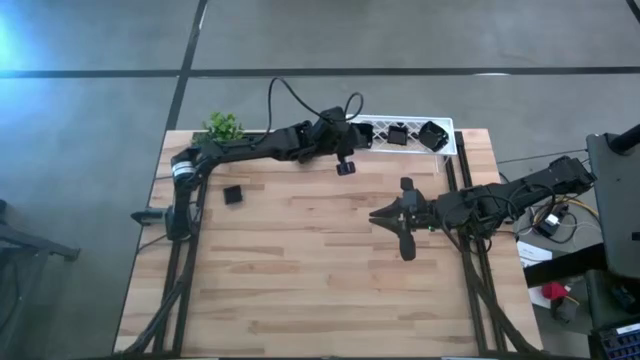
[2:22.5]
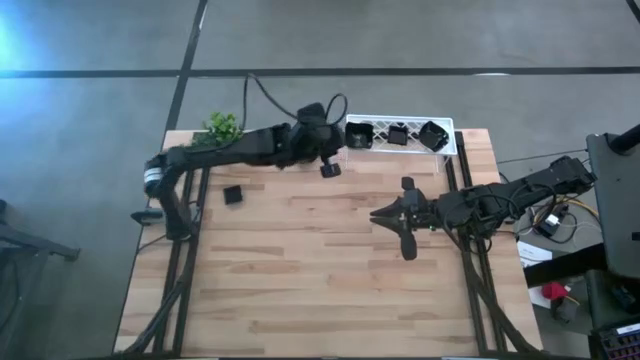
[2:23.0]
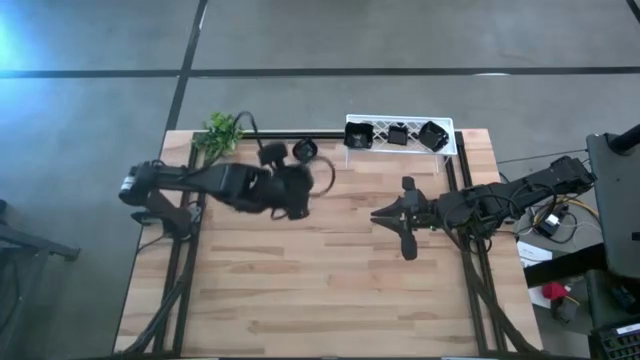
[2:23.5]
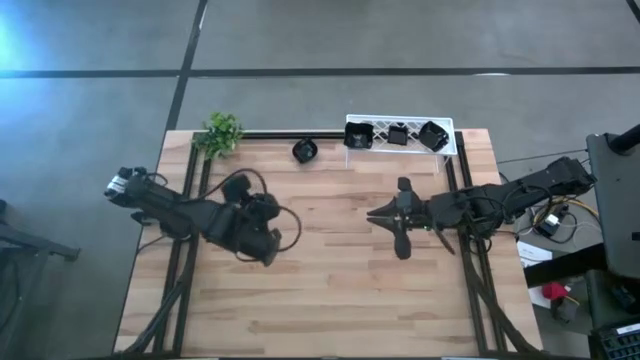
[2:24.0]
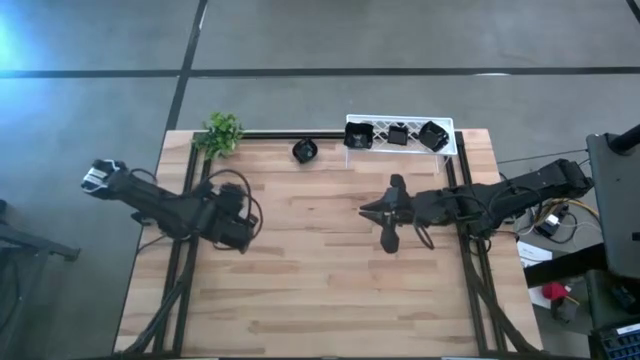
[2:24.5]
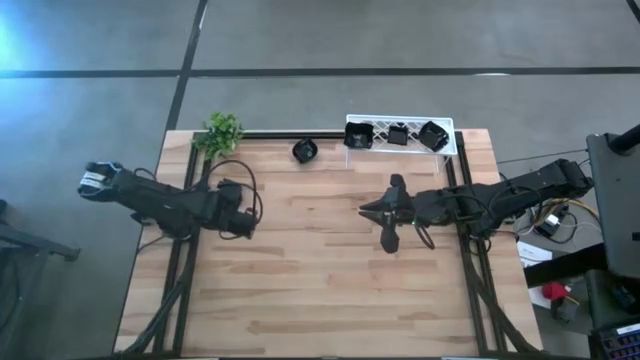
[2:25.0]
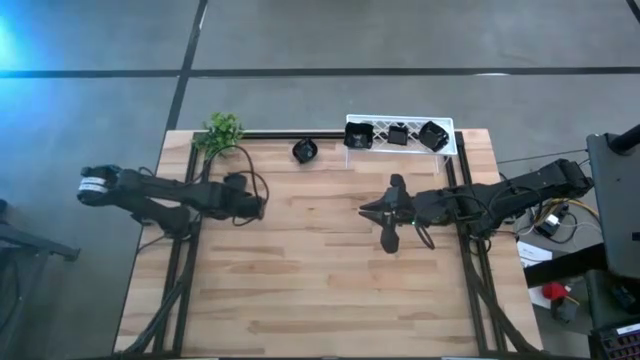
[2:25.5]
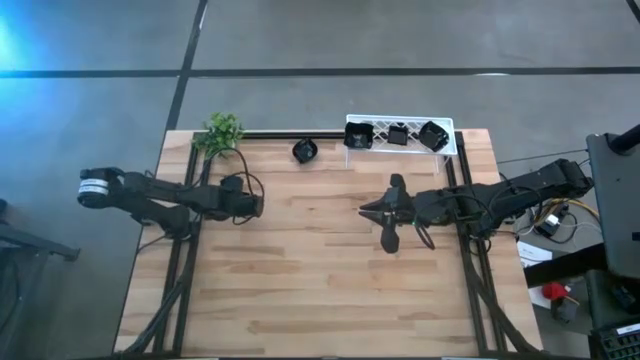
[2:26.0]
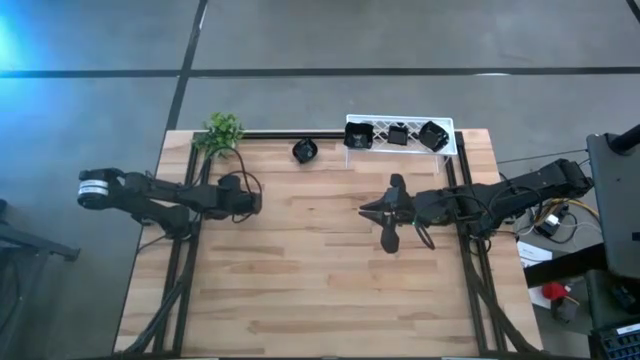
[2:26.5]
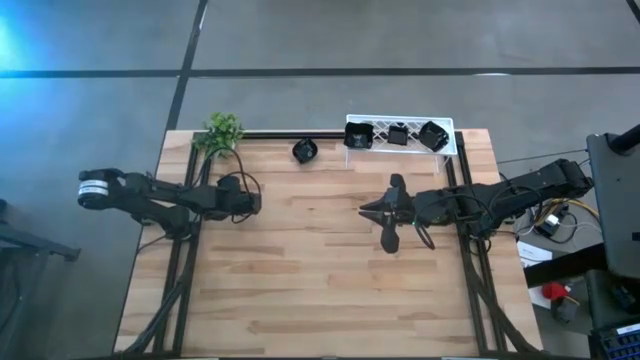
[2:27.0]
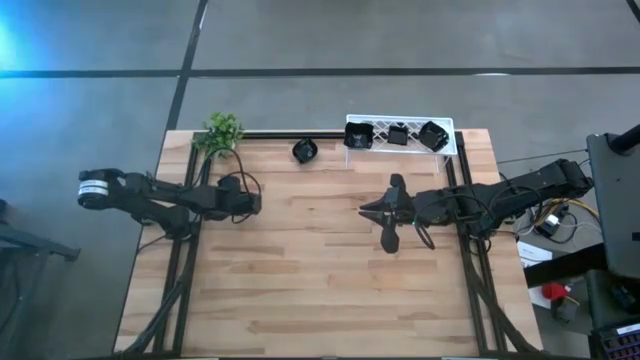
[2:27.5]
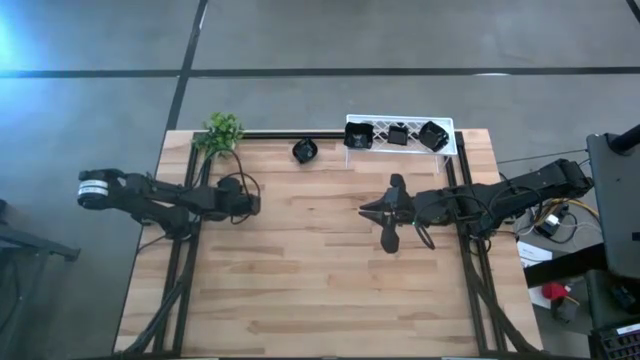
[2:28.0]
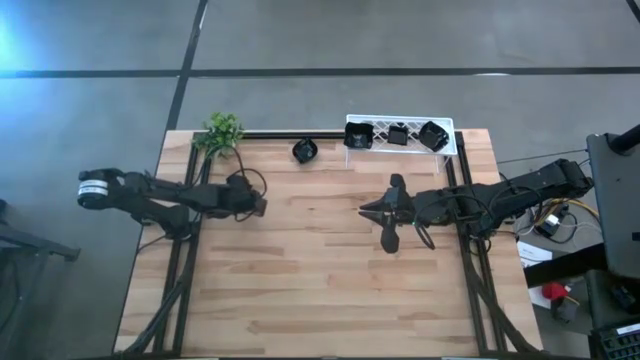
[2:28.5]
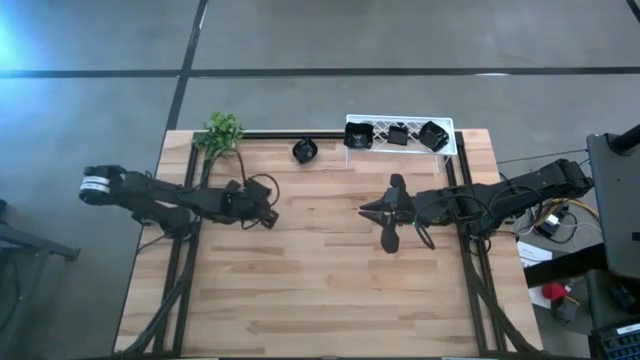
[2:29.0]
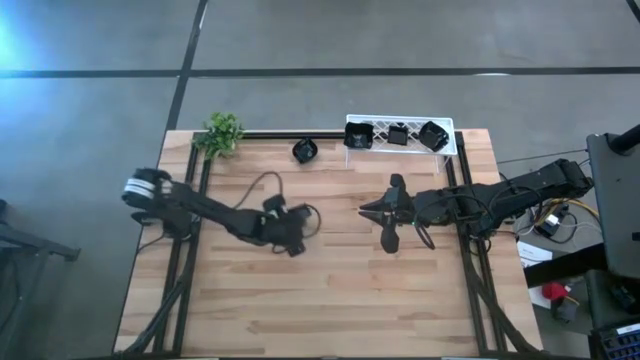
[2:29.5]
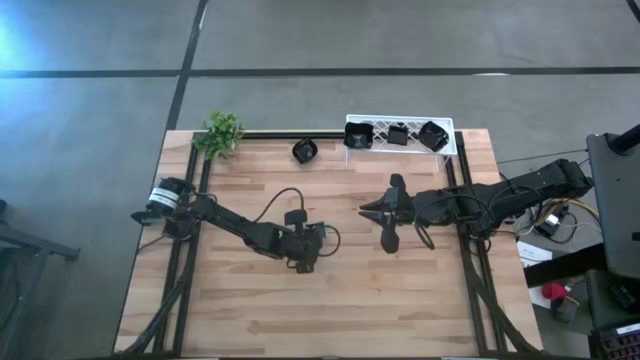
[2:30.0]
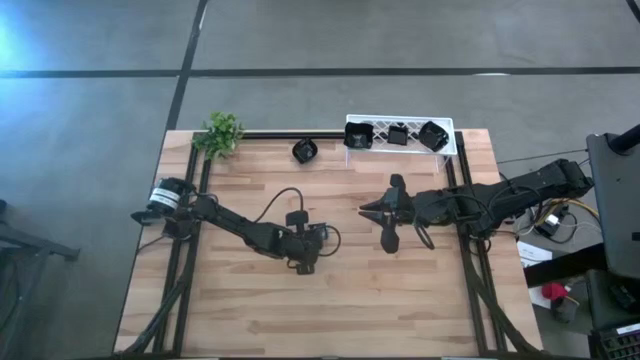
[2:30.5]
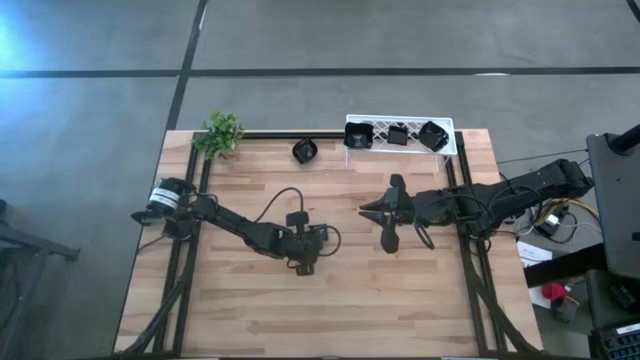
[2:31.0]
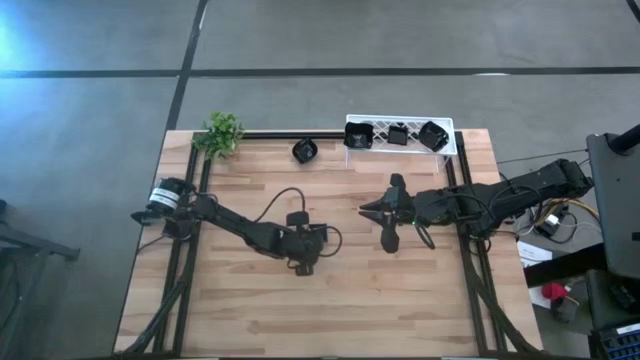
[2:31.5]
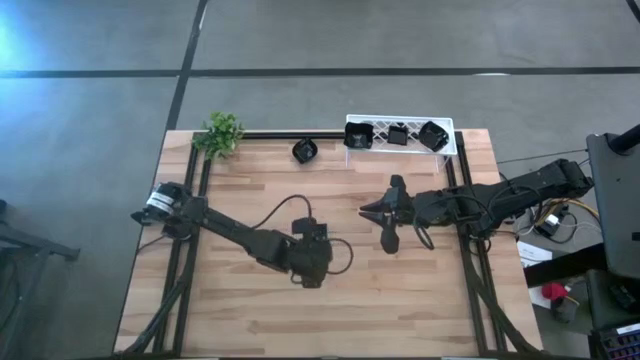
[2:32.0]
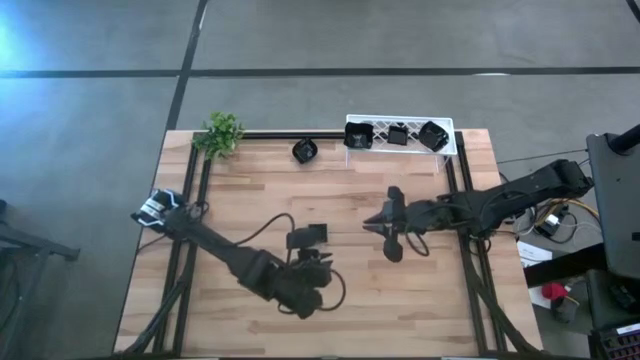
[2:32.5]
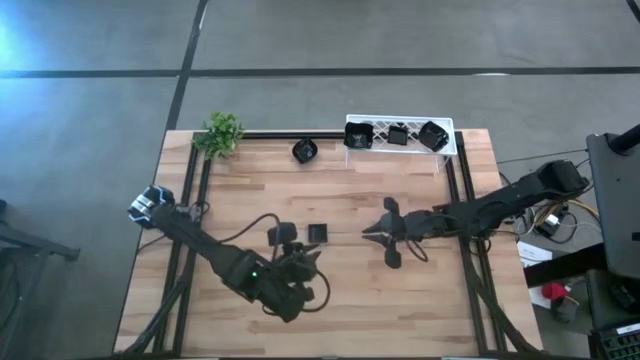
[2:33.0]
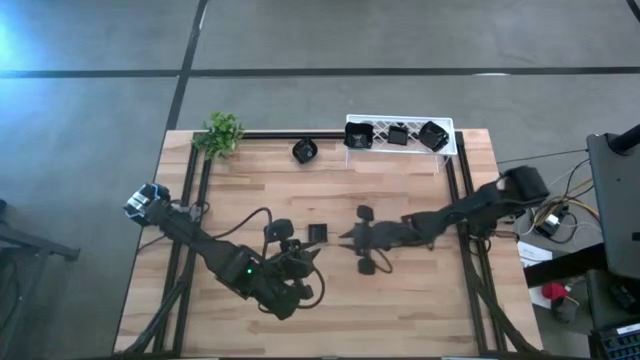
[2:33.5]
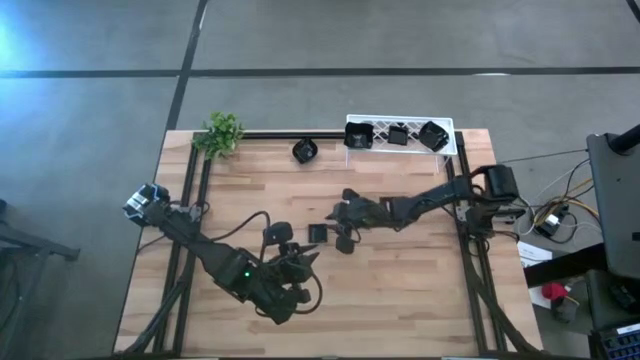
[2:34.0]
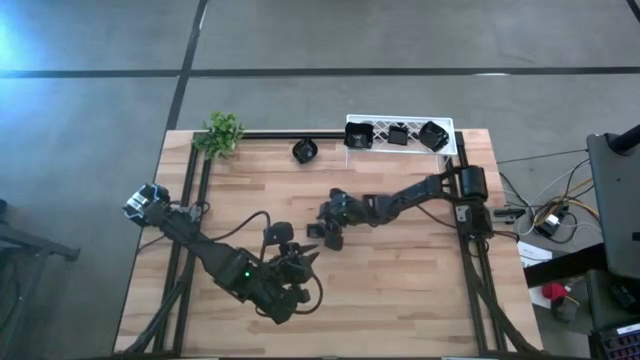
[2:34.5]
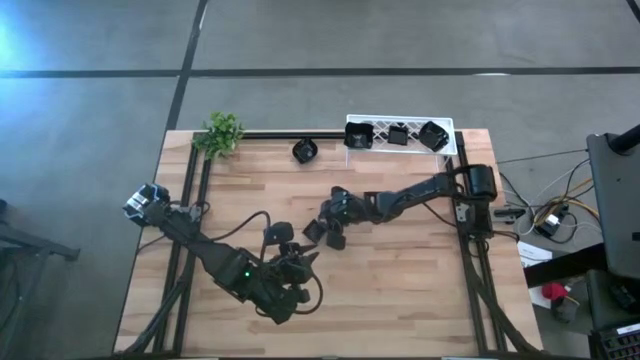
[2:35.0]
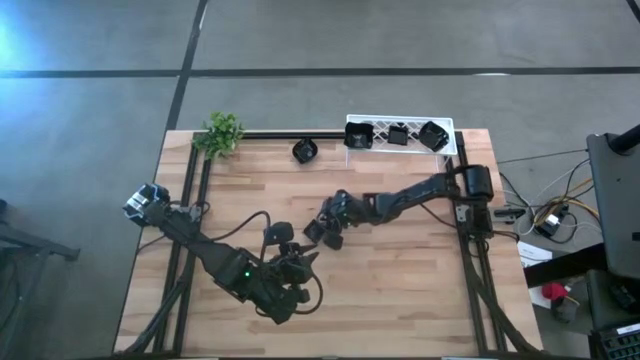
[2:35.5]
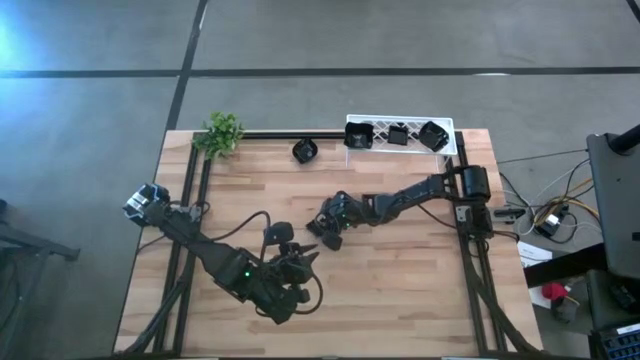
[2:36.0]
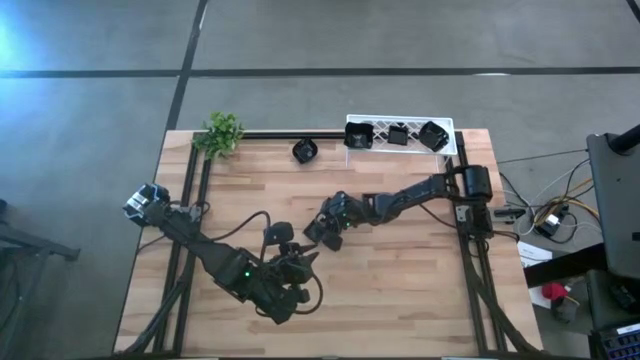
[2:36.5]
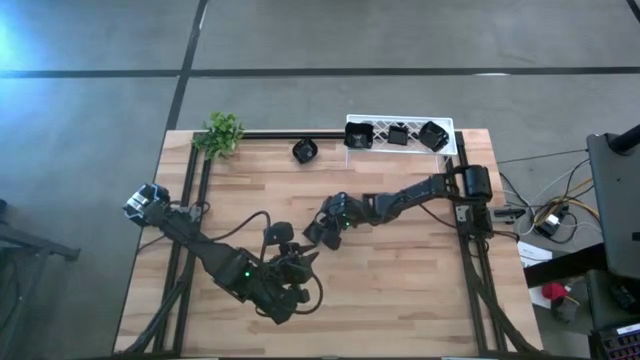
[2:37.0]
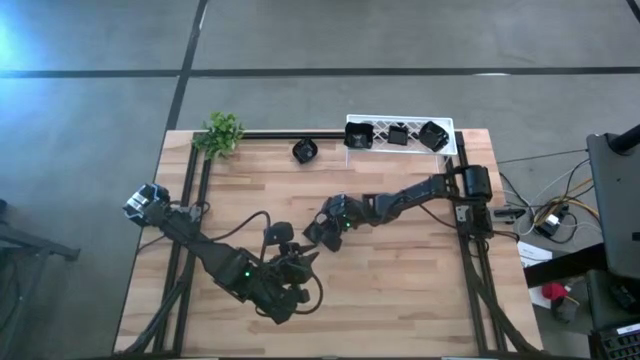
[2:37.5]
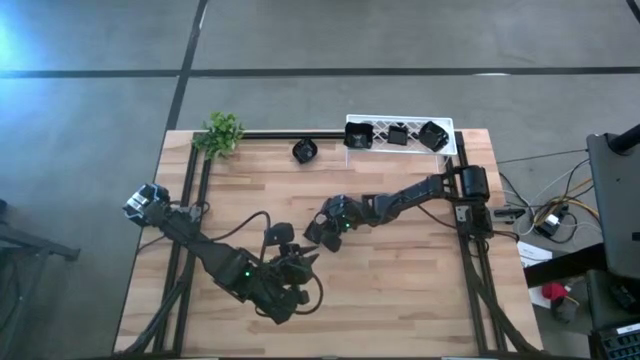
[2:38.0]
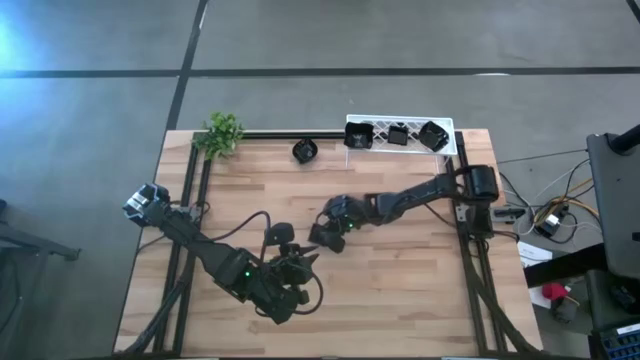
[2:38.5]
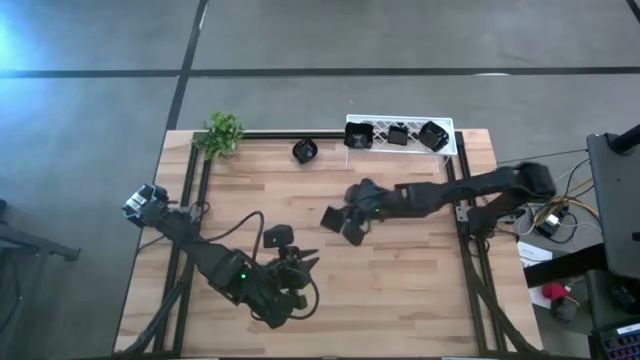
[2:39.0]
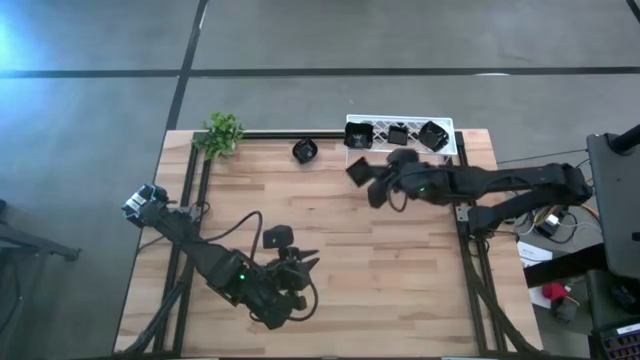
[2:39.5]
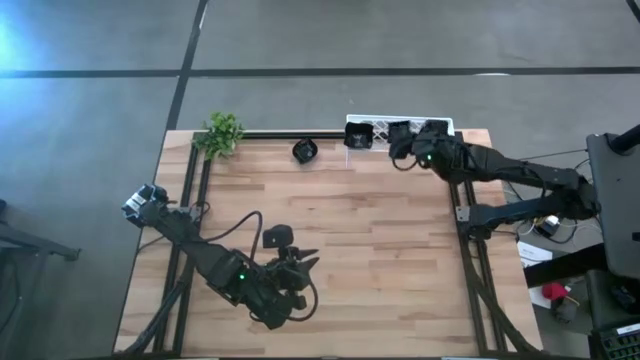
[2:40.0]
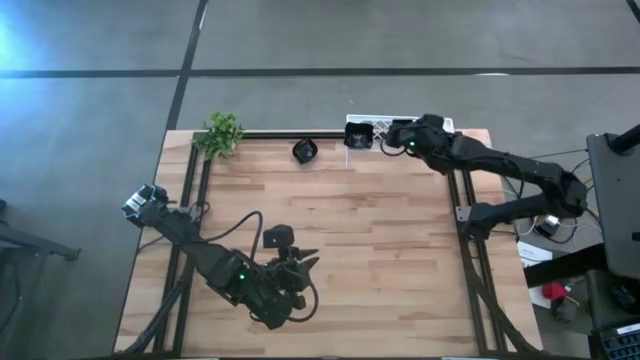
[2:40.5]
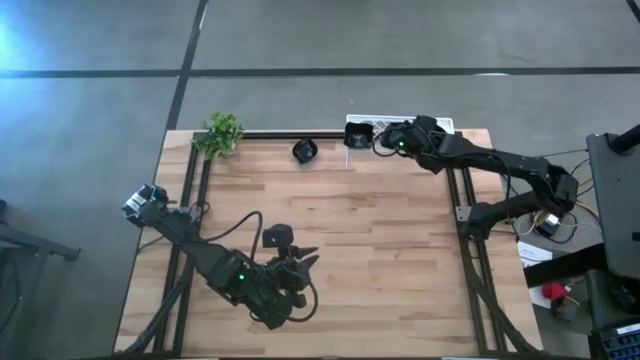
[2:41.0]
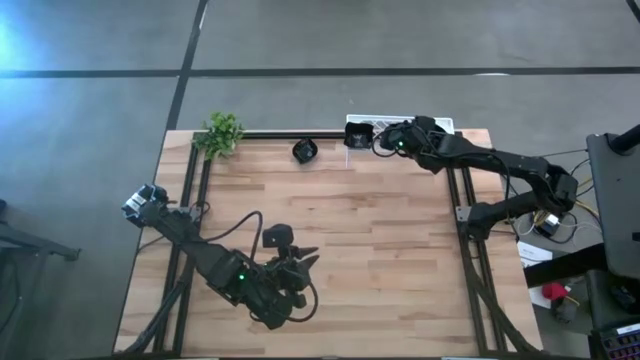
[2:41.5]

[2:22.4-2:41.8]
Task: Pick & Place Mini shaped plates
Stack the black square plate on top of the black square plate on the shelf
